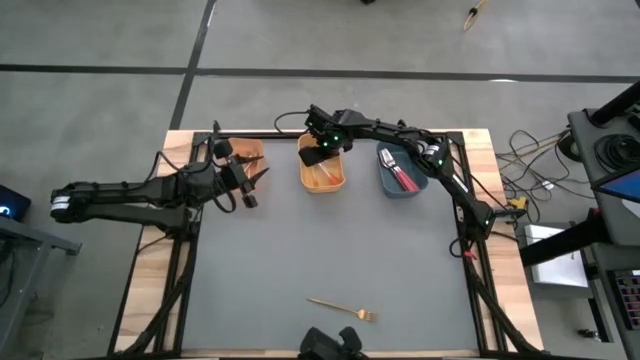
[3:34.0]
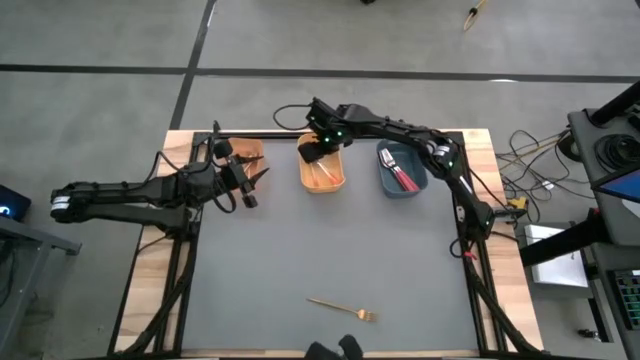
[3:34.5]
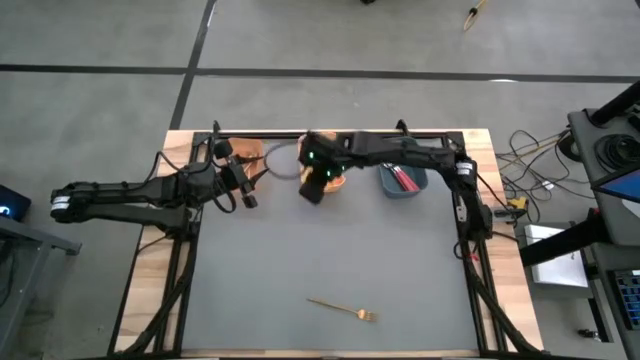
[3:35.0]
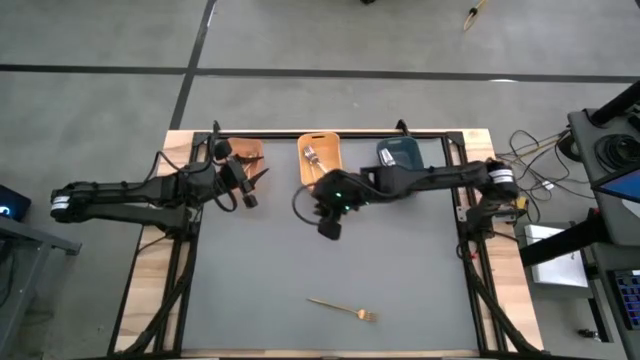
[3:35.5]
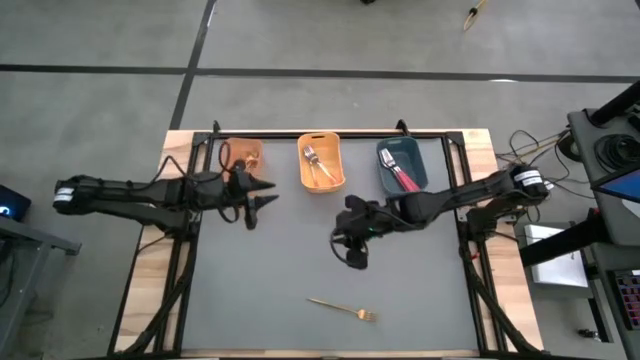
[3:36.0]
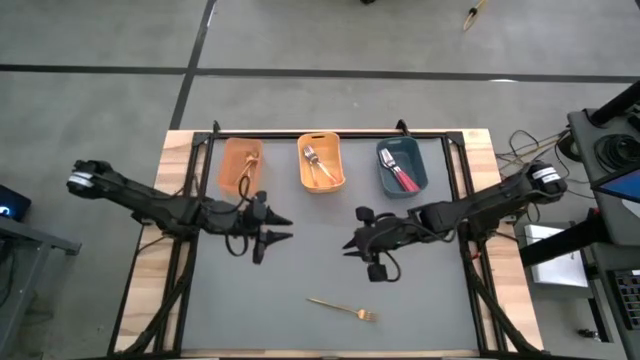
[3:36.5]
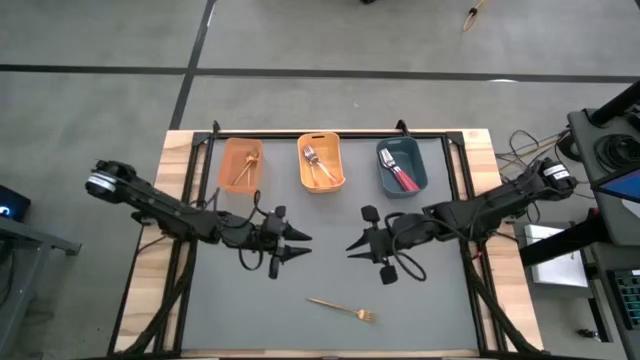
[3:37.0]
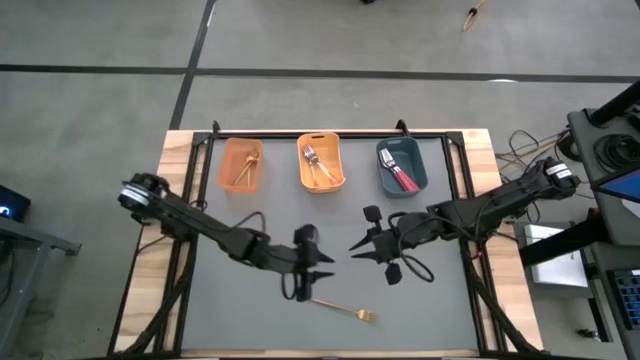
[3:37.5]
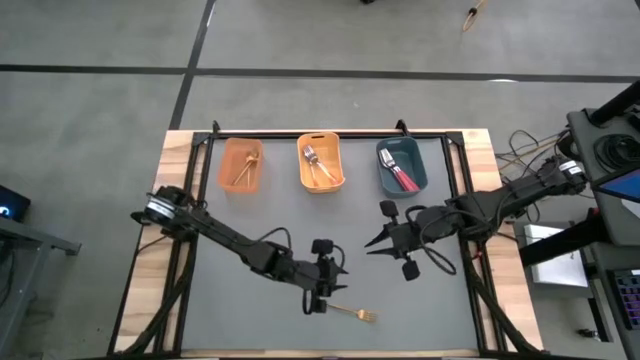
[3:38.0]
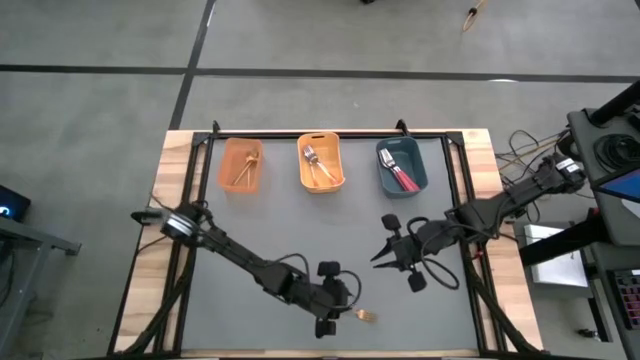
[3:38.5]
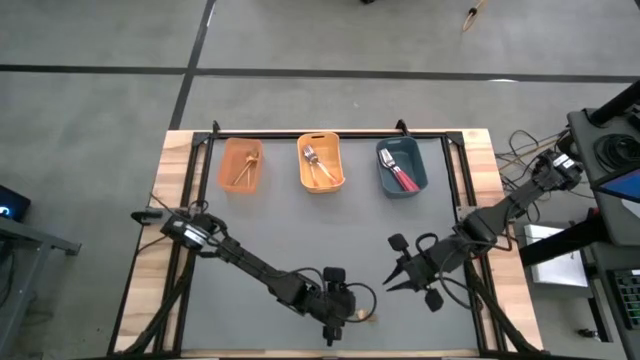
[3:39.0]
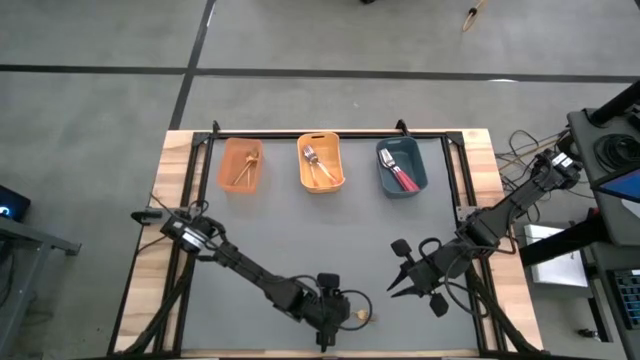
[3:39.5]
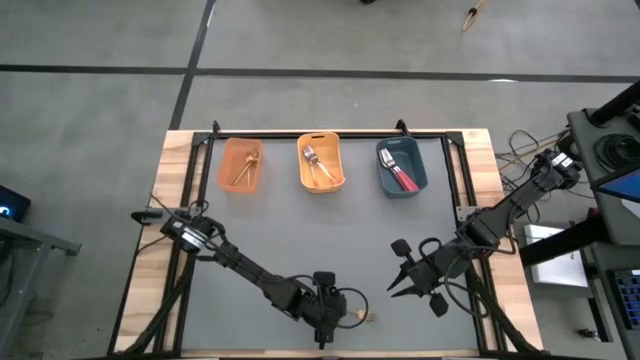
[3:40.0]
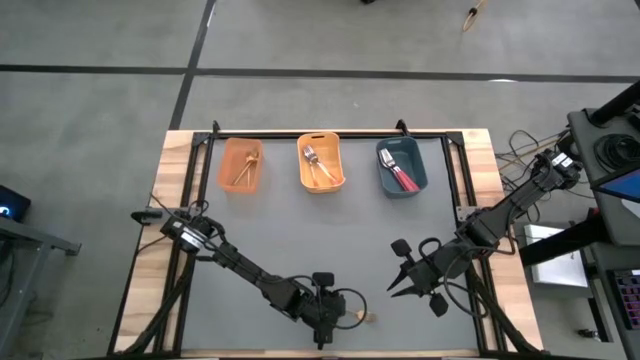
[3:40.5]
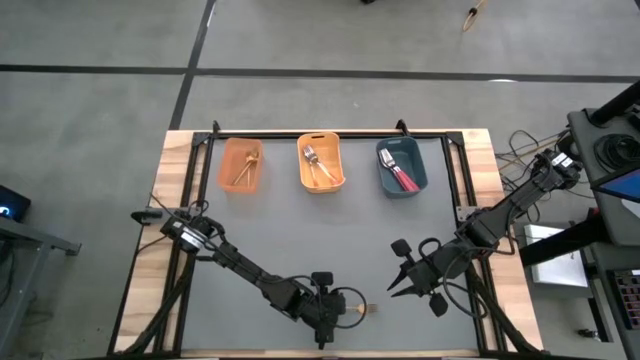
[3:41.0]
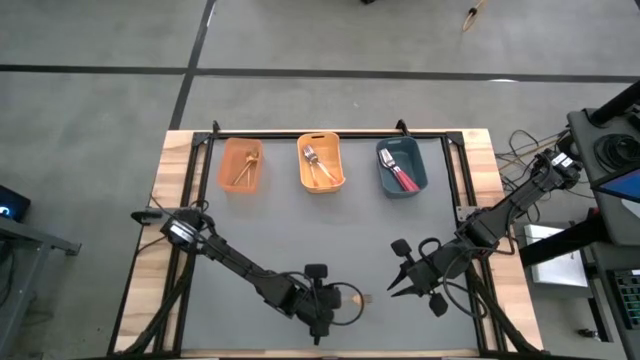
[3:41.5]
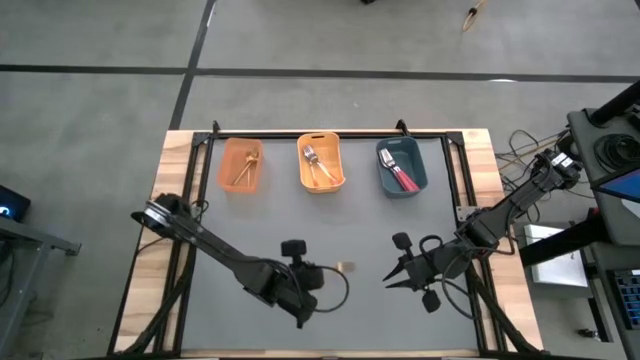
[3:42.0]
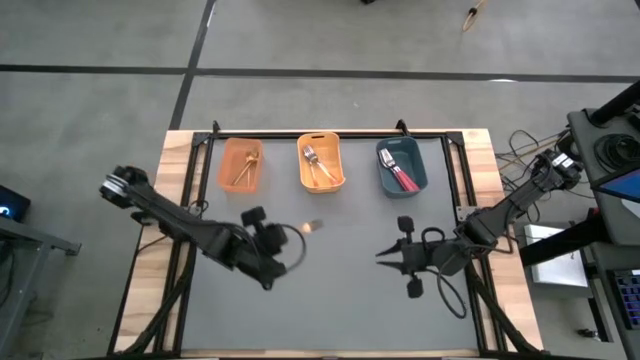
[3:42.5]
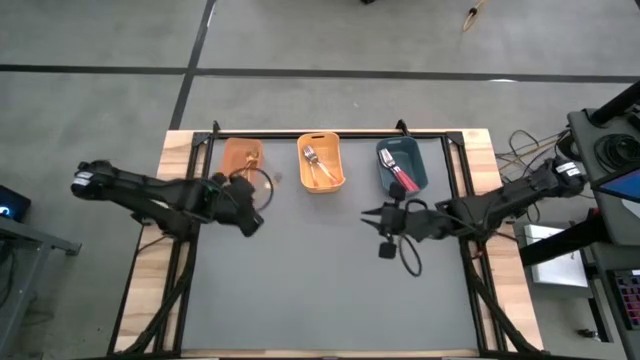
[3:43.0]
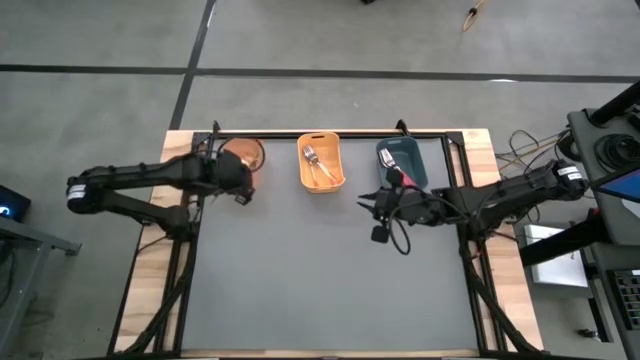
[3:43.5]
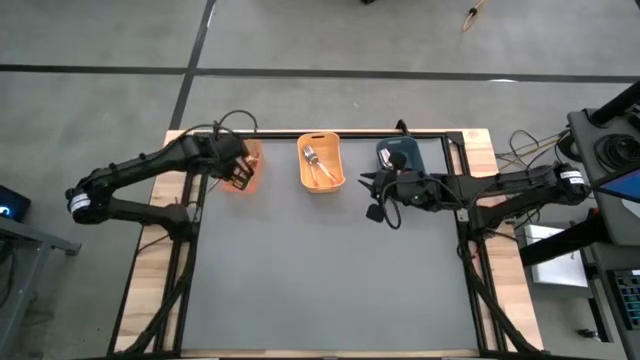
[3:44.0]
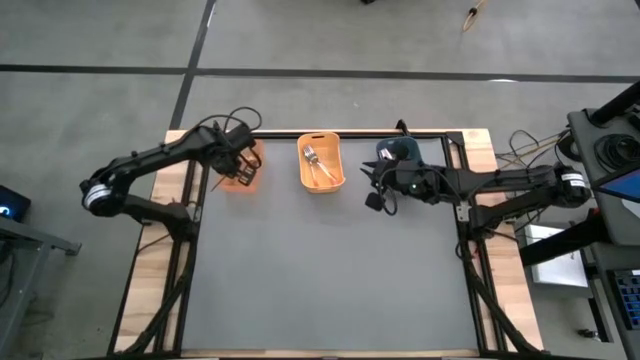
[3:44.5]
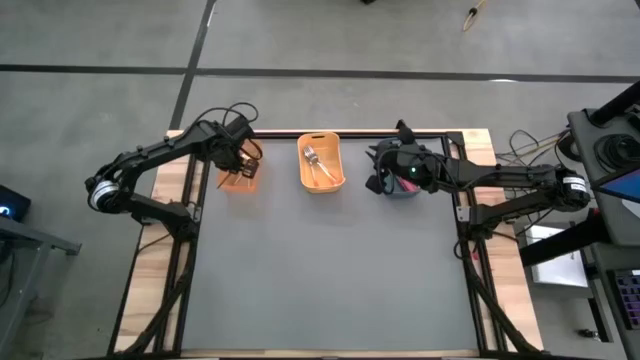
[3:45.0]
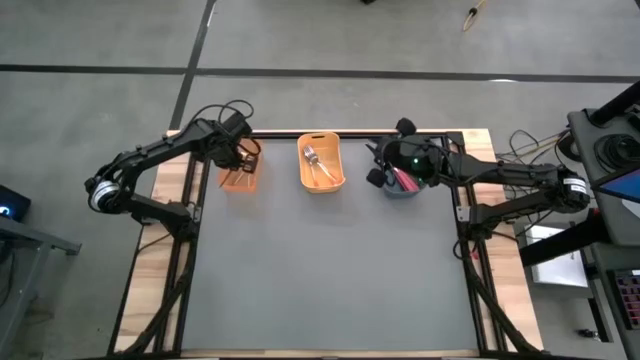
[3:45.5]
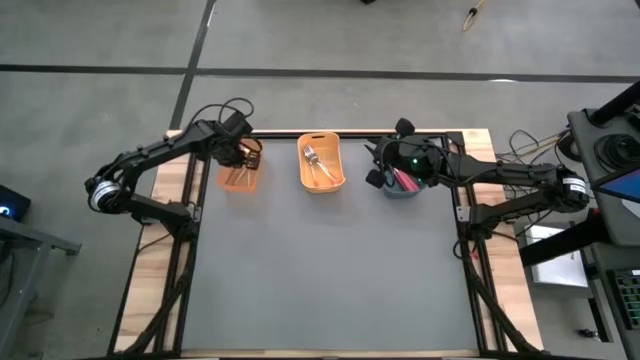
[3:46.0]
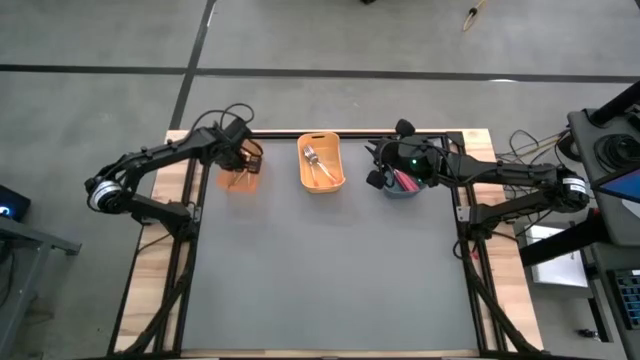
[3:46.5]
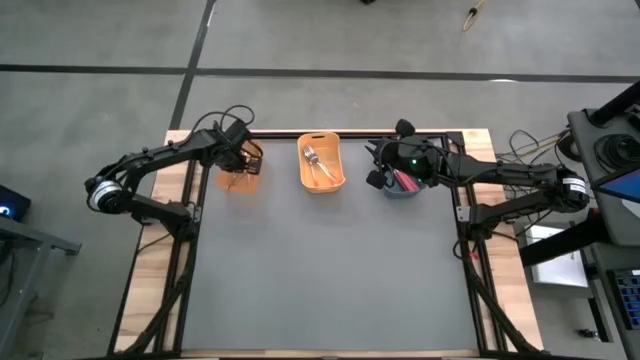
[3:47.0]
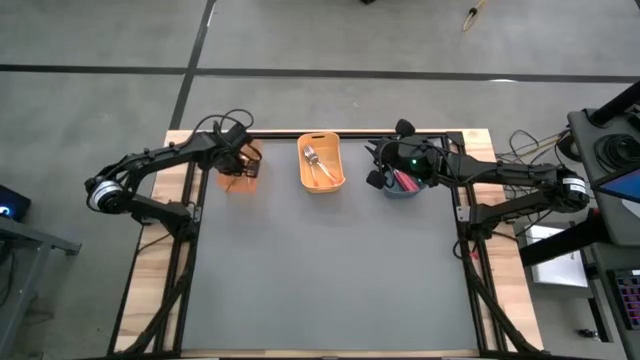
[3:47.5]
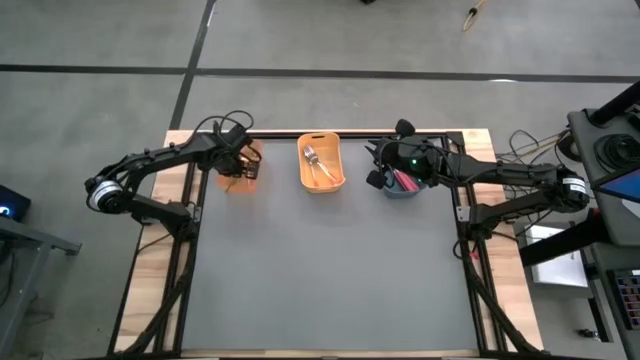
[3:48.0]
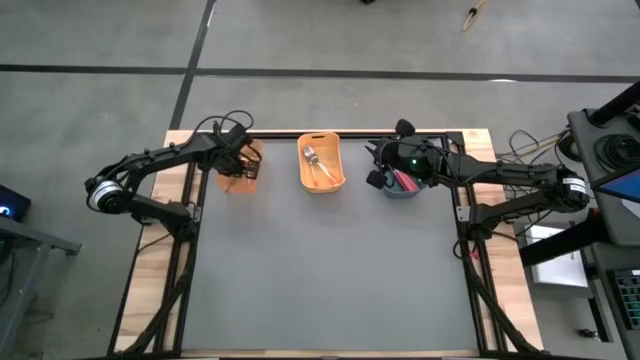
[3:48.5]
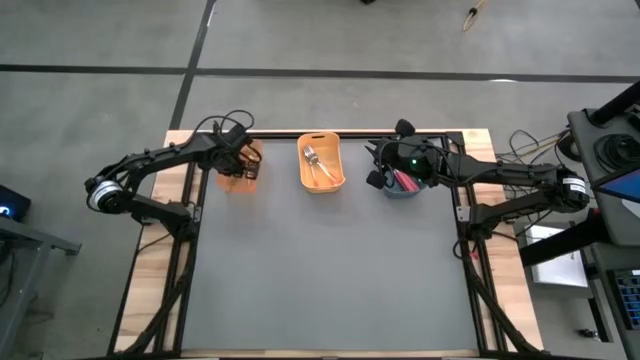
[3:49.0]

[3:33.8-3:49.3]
Task: Sort silverware by color (type)
Put the gold fork into the orange bin

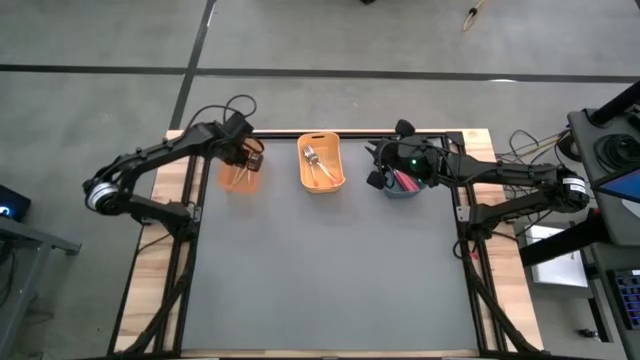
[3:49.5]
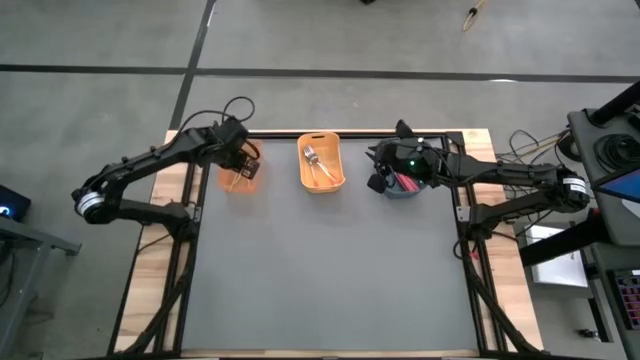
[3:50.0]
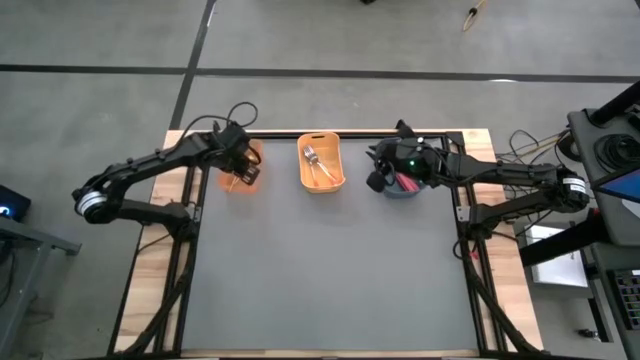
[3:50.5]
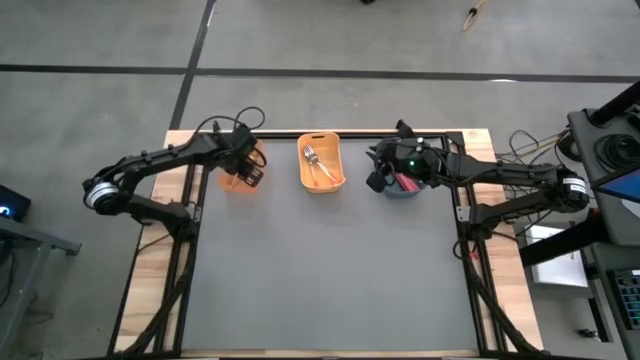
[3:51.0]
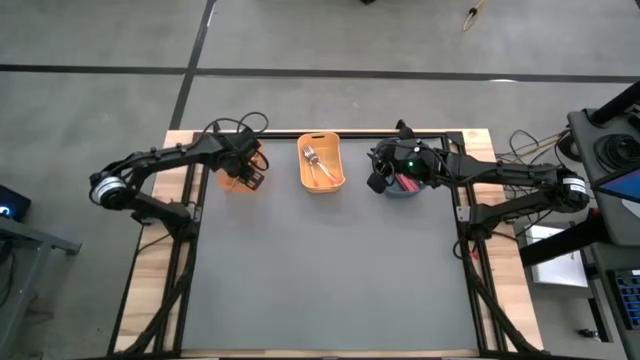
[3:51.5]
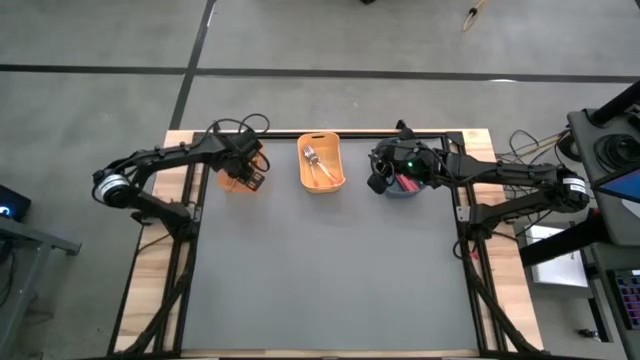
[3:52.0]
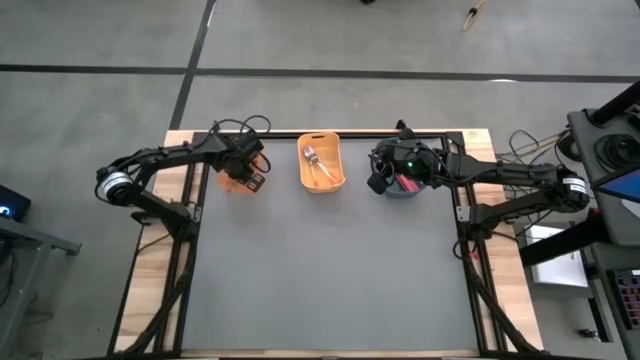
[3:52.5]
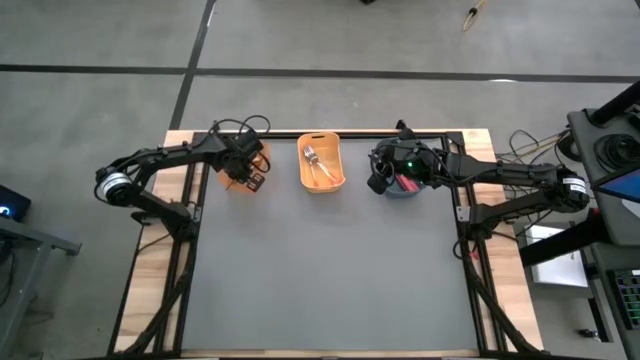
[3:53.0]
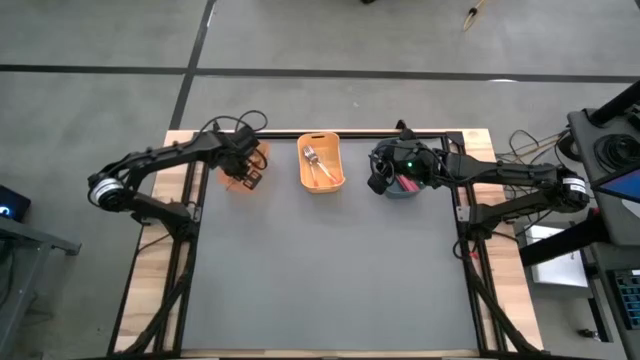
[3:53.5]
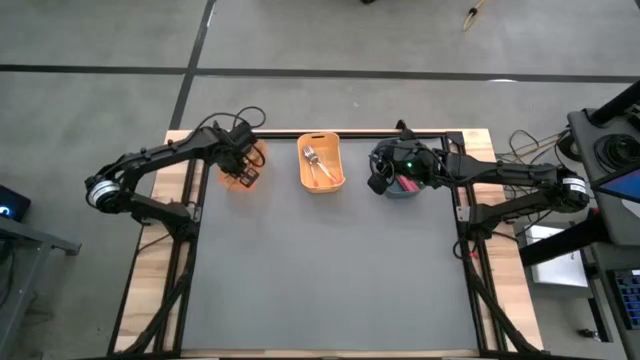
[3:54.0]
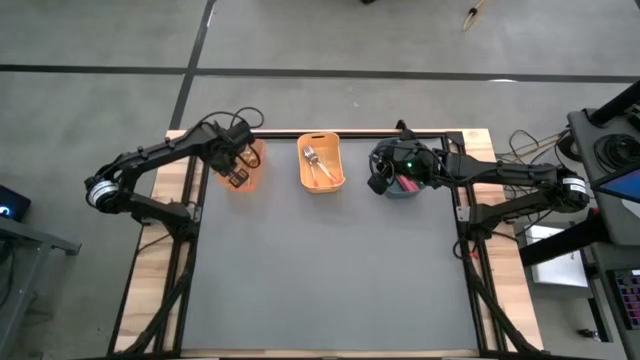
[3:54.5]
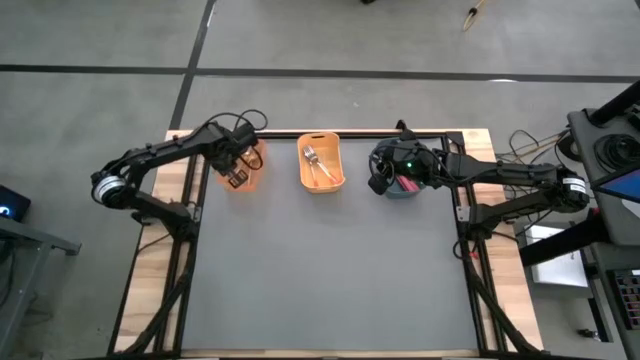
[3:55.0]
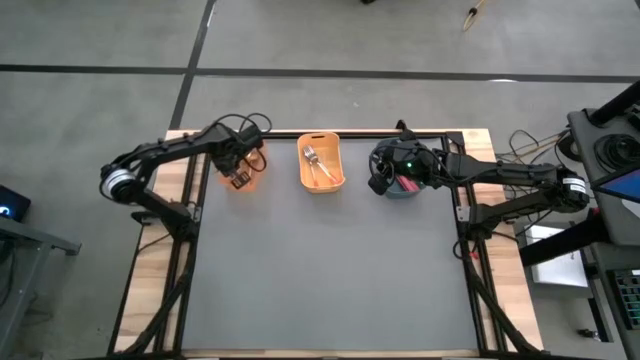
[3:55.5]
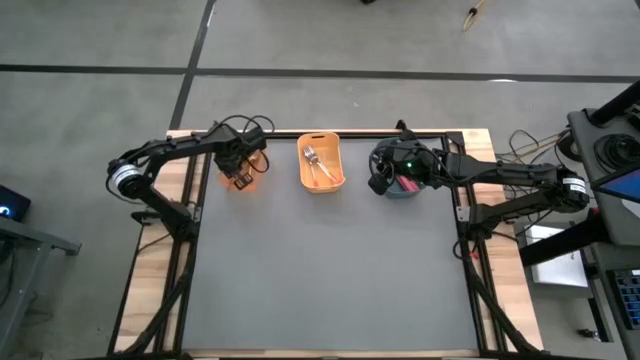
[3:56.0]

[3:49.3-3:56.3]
Adjust the gold forks in the orange bin

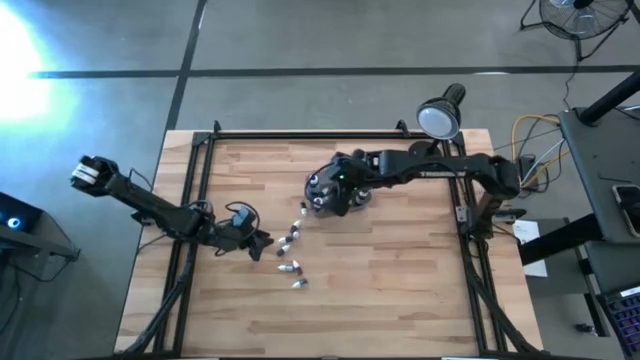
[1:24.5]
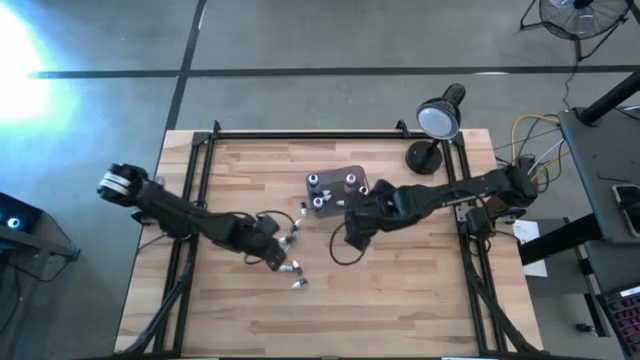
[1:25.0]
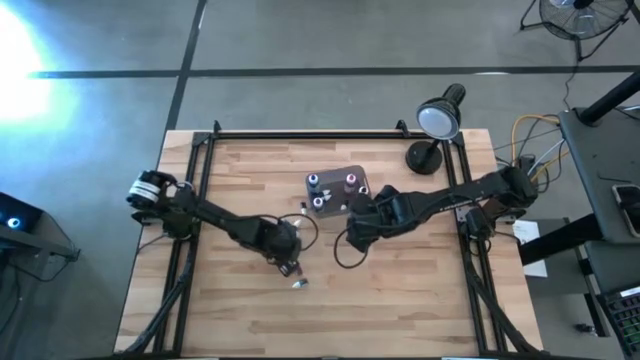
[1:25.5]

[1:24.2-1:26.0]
Task: Pick & Place food coloring
Put the small black food coloring bottle into the black transparent bin
